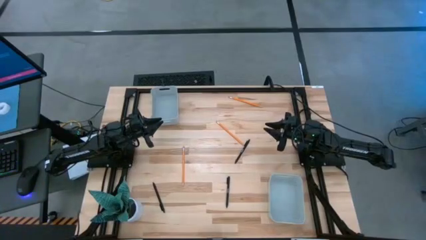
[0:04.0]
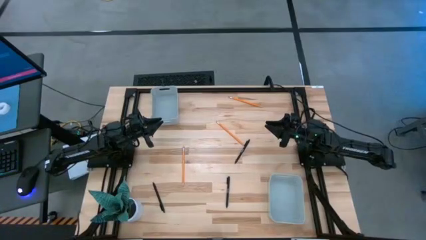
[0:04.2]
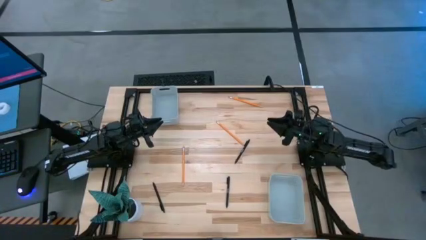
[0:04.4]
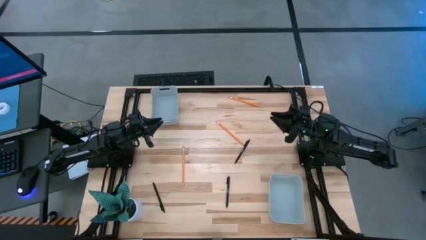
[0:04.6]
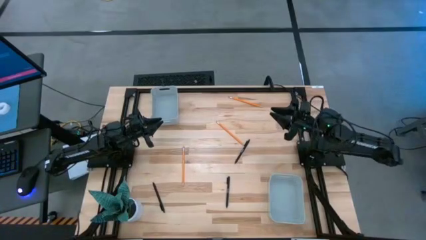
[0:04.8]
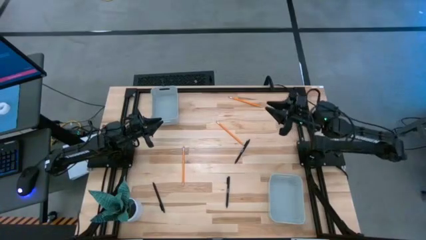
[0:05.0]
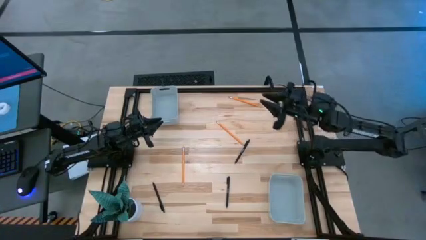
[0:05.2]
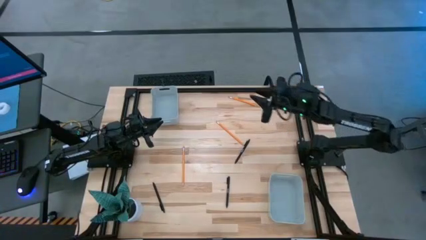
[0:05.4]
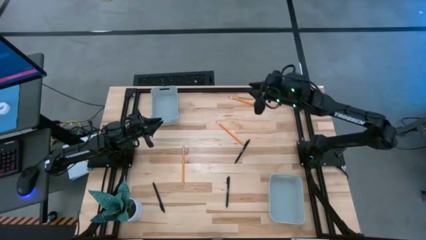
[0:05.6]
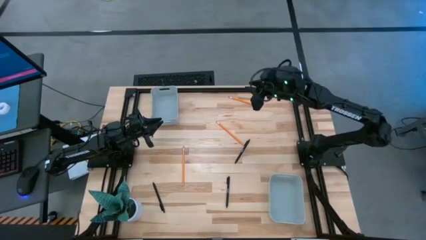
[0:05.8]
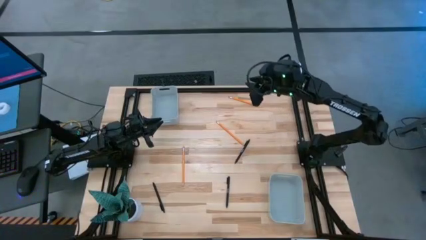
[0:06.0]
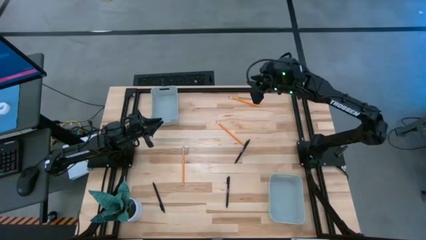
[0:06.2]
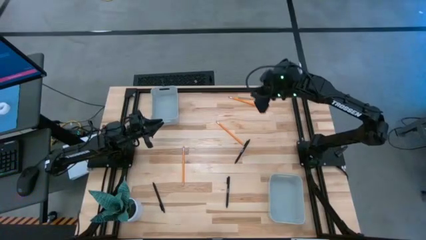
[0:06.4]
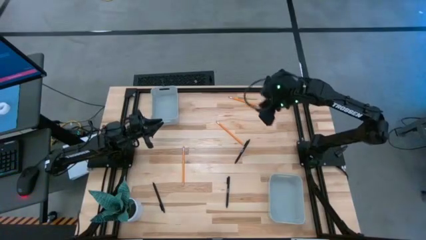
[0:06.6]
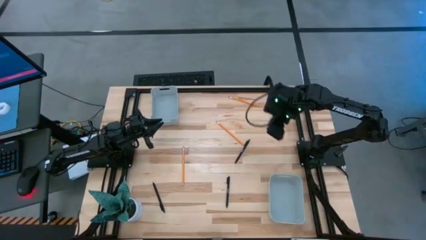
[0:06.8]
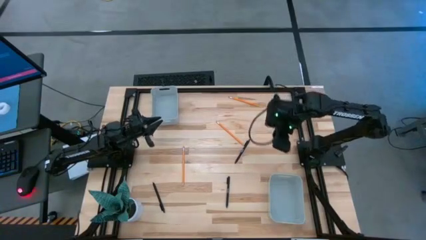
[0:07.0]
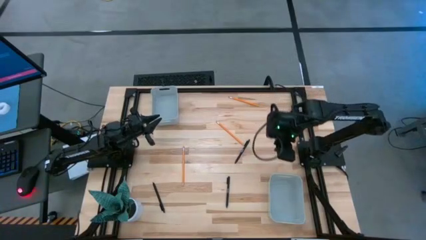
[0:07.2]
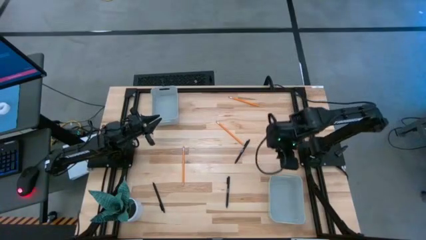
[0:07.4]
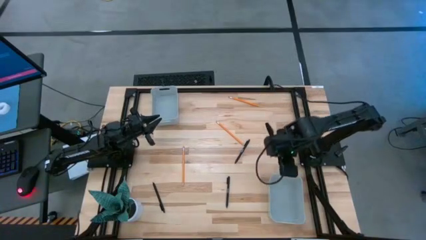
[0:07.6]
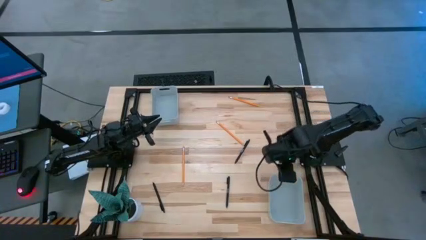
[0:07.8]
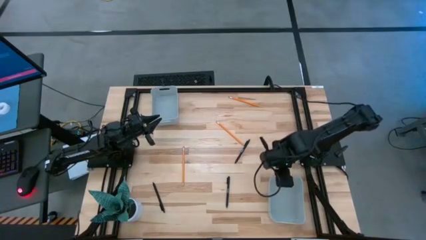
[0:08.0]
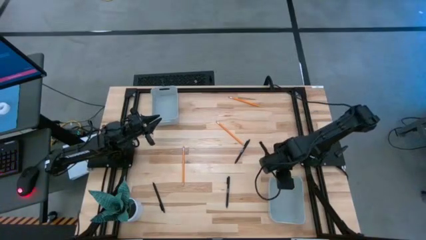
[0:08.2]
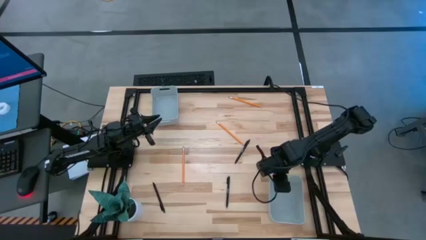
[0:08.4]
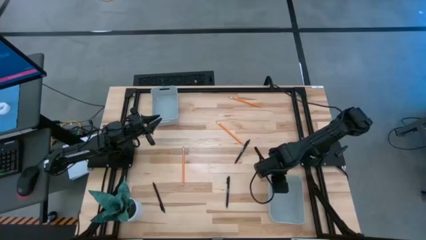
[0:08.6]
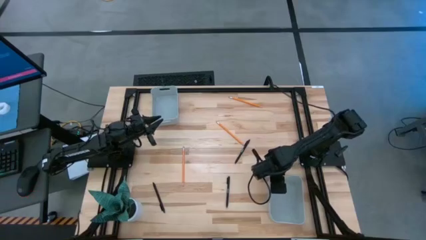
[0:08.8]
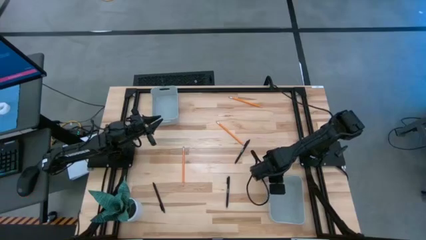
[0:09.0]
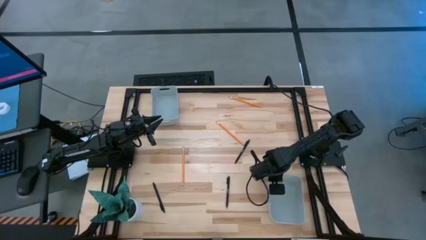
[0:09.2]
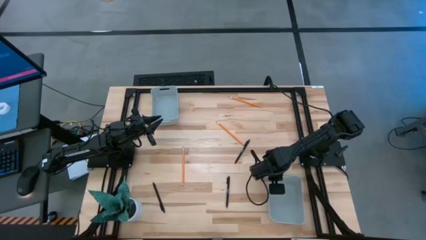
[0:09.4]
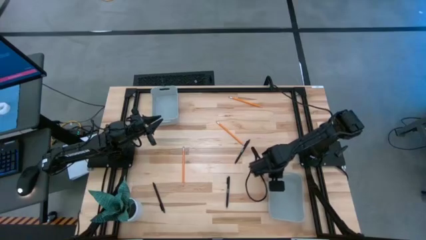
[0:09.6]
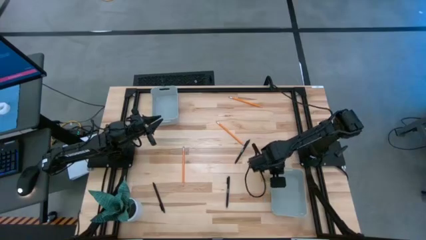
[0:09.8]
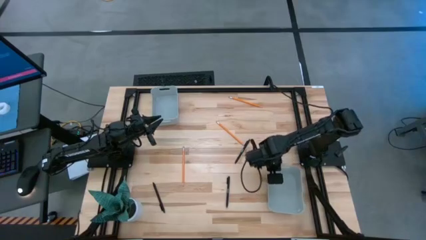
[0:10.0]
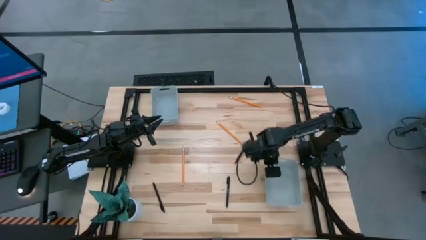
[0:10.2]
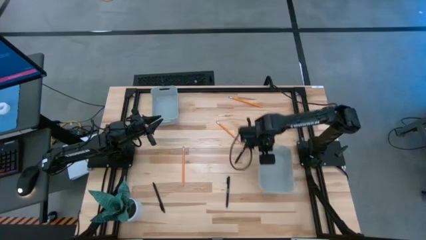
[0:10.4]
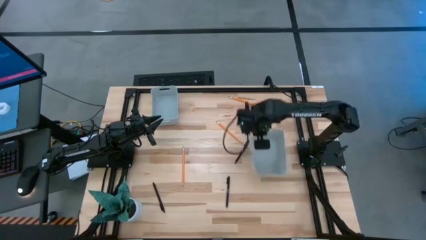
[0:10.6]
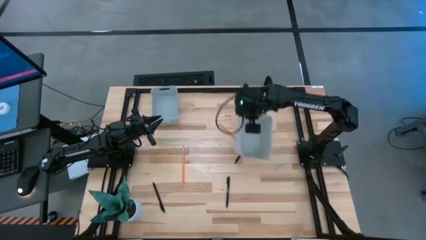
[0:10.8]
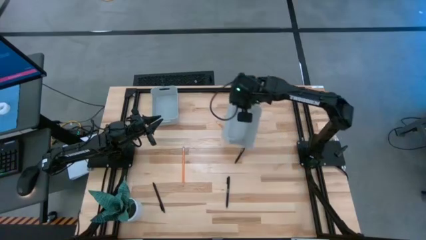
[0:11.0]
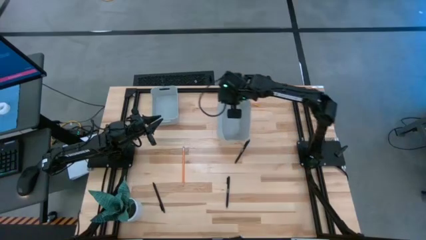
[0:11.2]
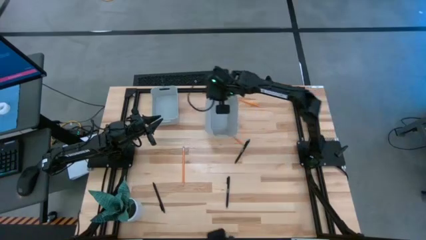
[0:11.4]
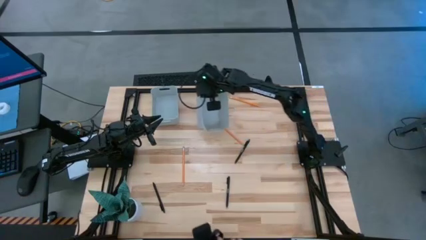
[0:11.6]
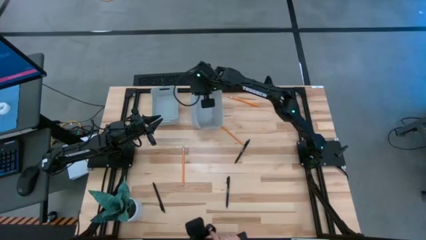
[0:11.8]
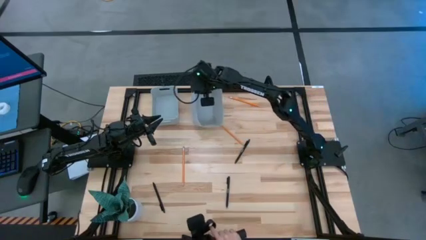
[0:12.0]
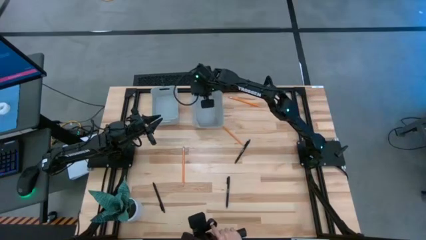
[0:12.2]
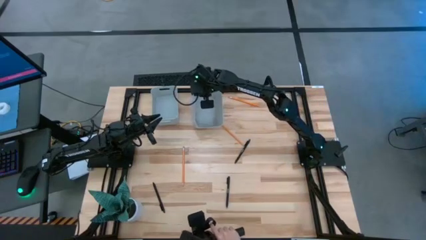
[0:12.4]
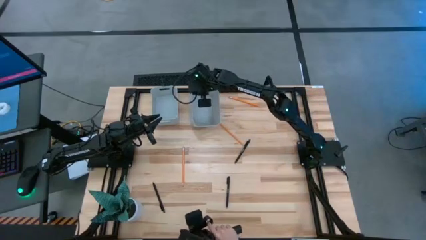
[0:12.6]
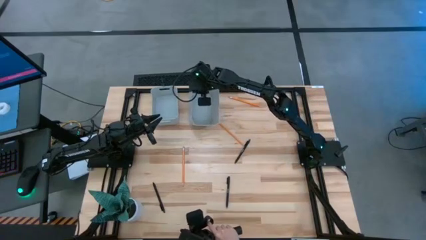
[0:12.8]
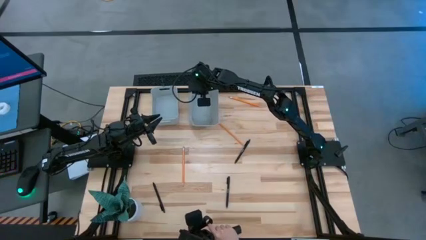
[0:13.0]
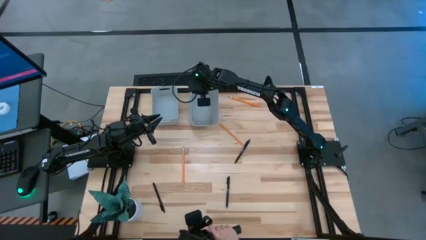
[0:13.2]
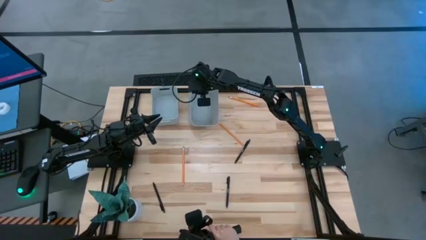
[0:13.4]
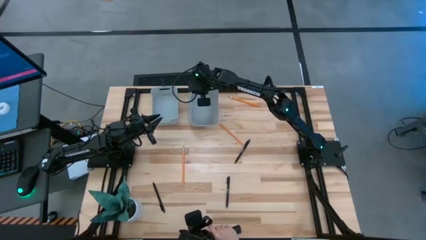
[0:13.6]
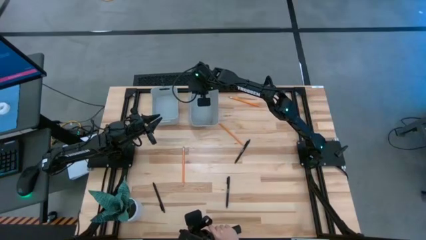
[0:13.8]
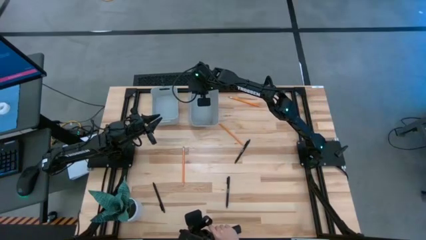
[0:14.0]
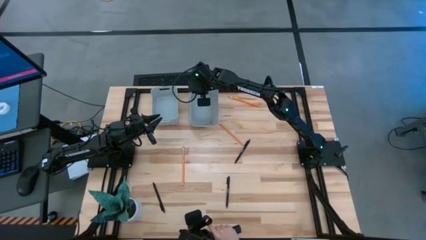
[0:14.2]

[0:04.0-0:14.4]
Task: Sort pens & pencils
Move the bottom gray bin to the top of the table
